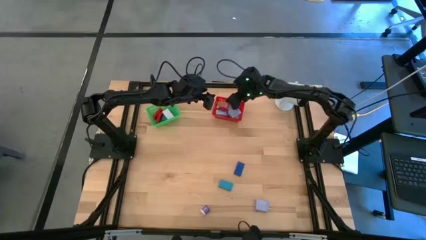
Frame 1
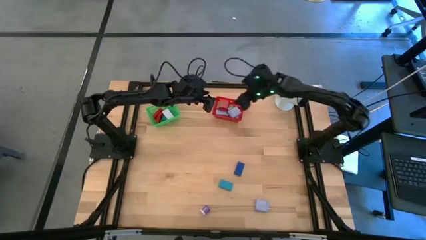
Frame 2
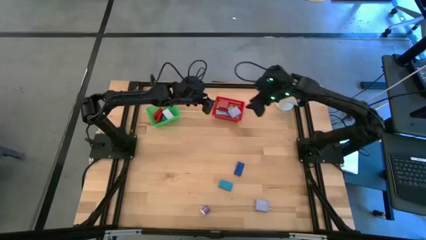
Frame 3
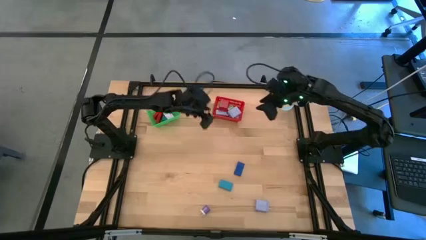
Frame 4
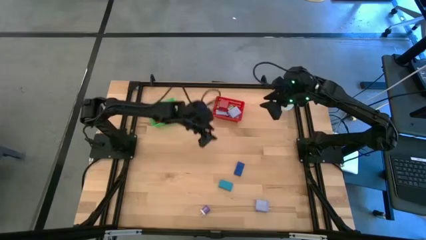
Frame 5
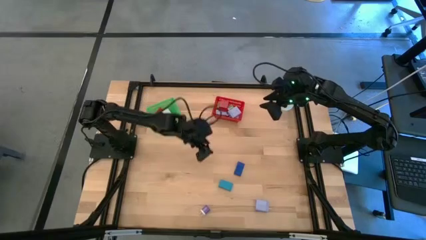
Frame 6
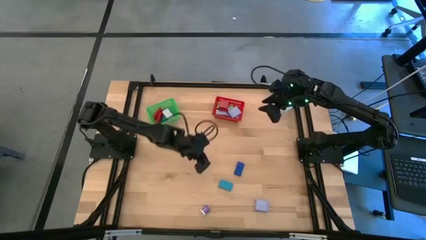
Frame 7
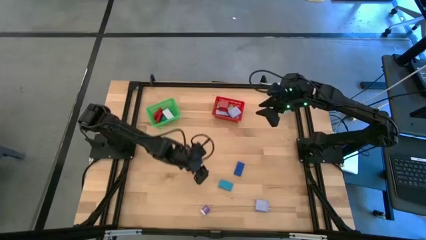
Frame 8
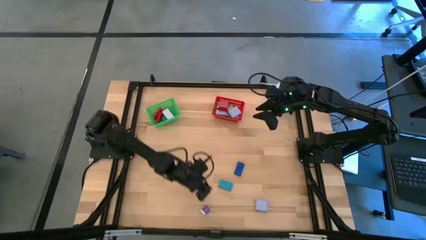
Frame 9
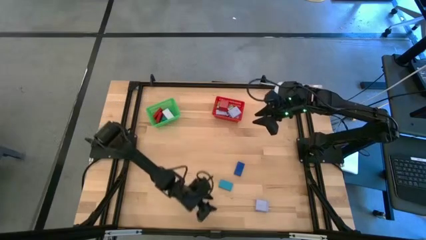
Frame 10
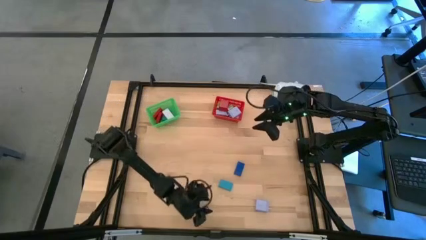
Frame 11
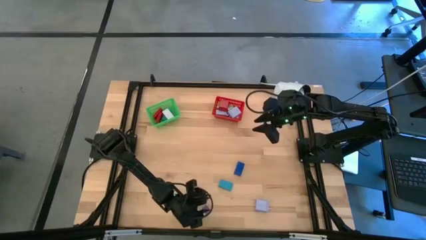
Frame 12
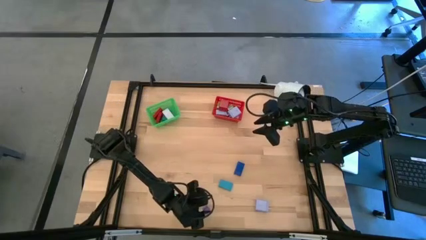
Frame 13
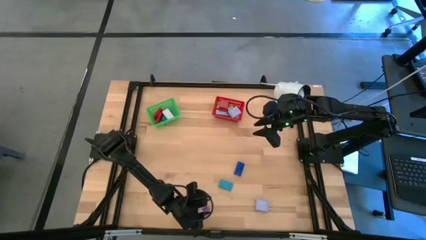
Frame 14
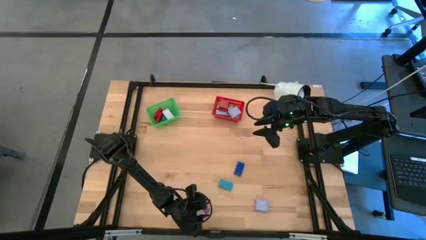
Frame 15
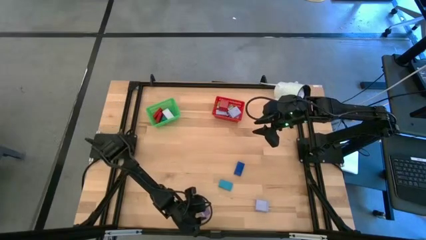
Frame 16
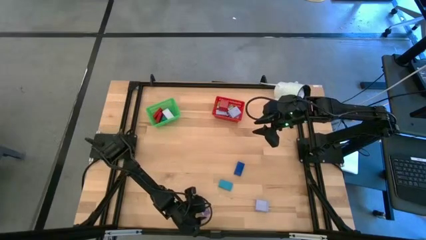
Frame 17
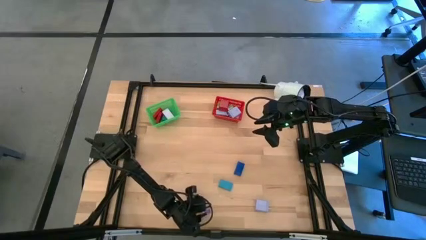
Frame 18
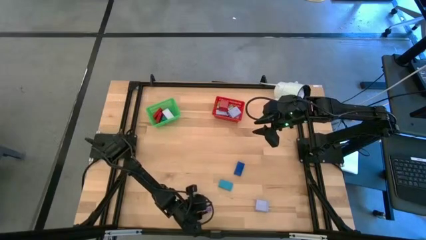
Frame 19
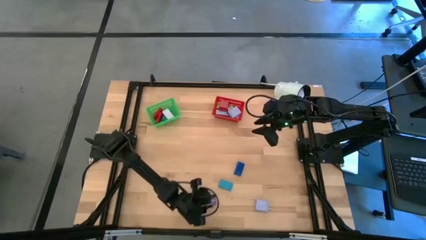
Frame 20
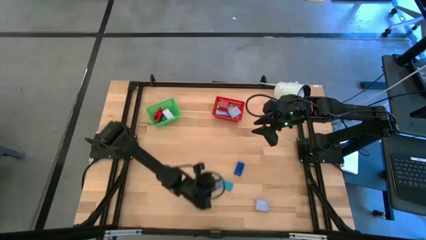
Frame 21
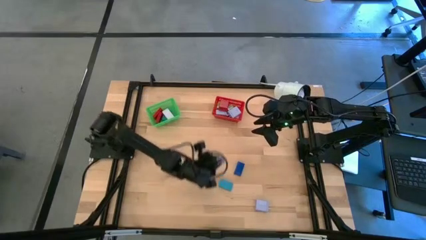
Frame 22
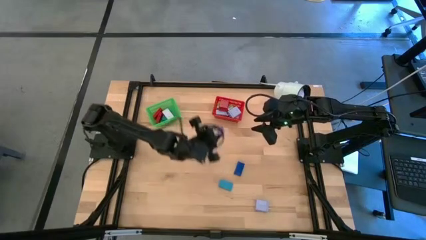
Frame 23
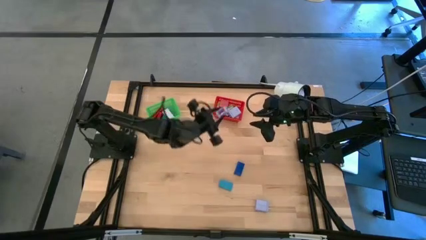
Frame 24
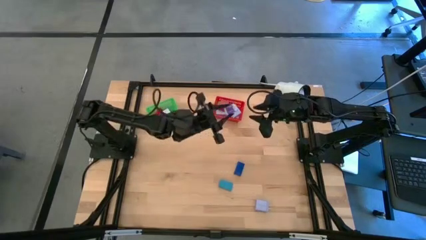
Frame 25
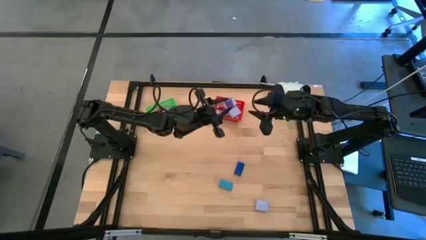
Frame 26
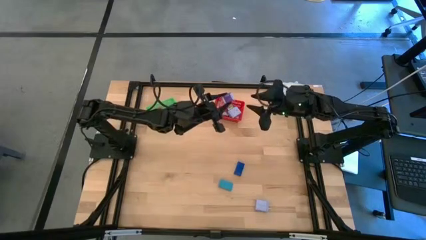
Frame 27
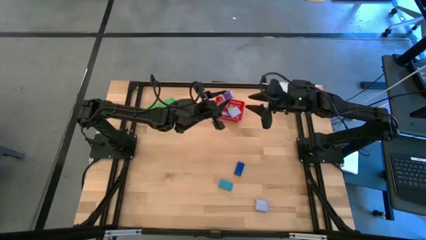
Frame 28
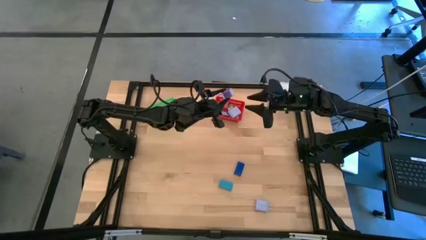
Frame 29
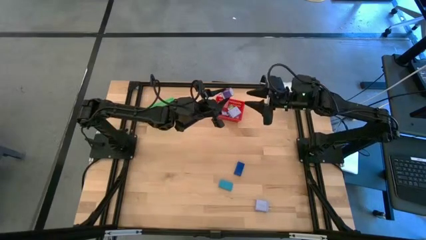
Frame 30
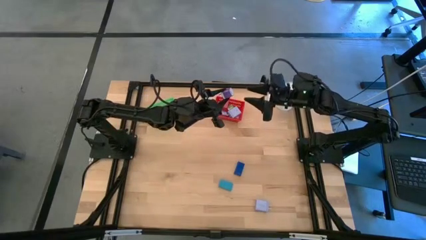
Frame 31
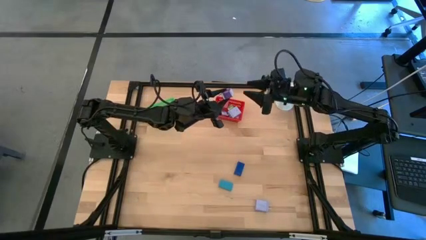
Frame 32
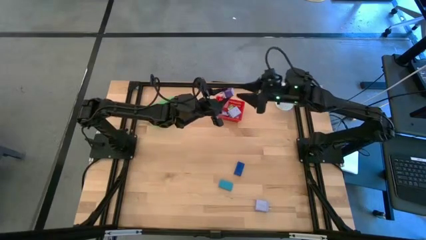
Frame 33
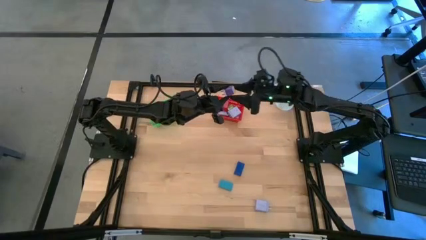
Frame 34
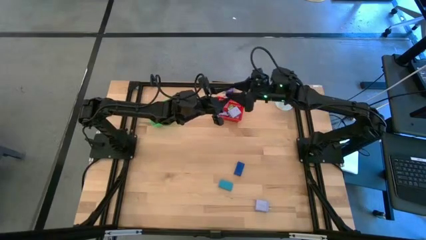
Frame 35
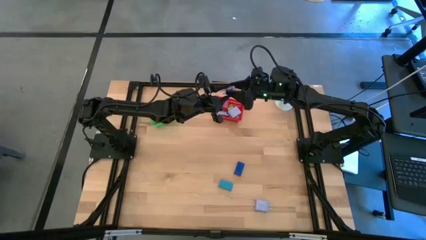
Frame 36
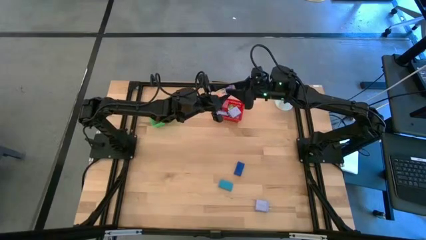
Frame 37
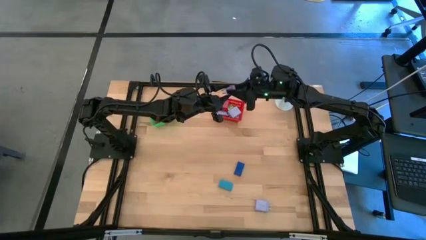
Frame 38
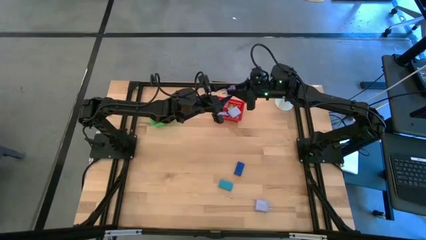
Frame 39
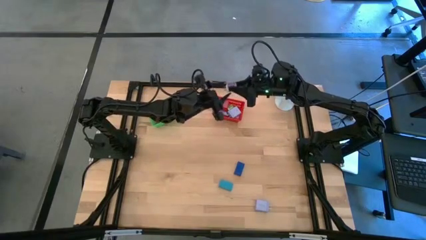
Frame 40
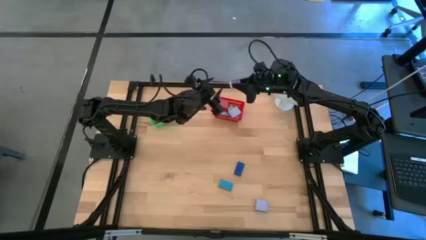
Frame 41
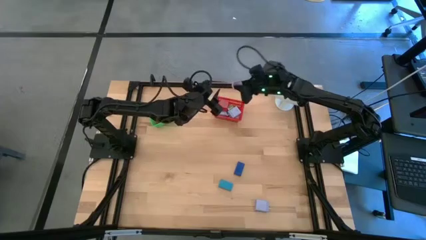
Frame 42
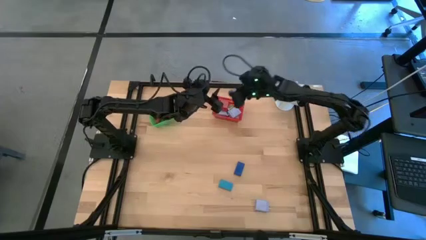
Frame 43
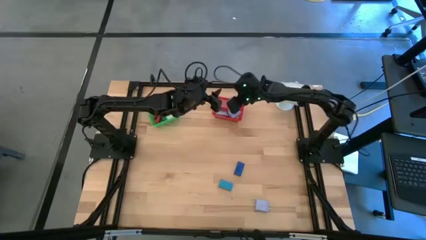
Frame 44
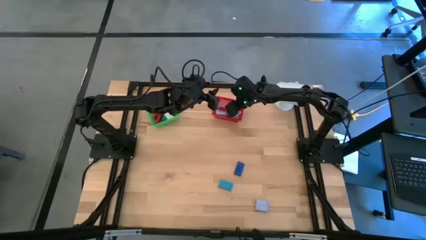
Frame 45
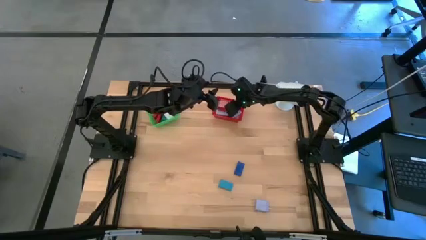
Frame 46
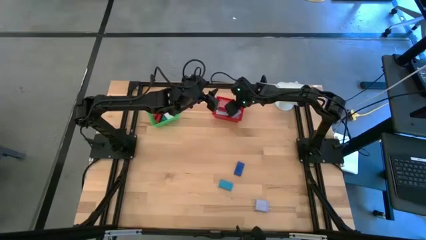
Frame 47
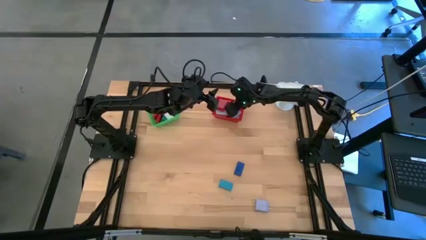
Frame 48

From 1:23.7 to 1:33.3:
Task: Pick & Place Office items
Put the violet charger adapter into the red bin

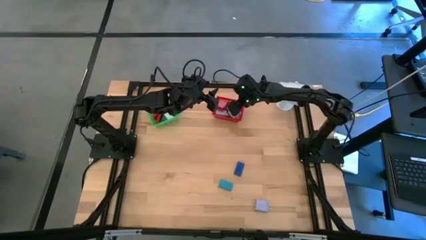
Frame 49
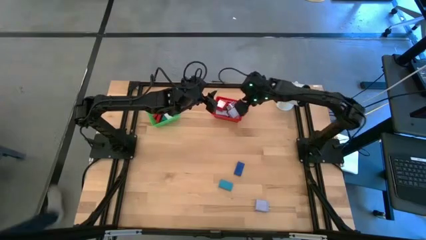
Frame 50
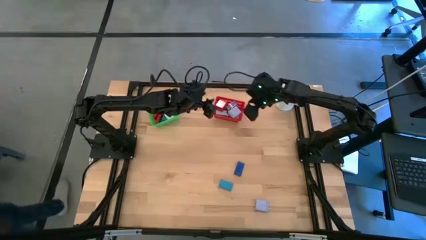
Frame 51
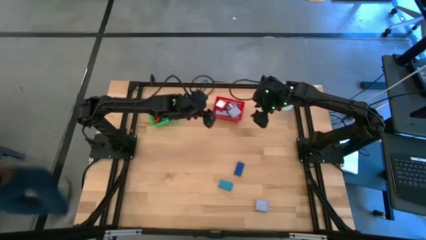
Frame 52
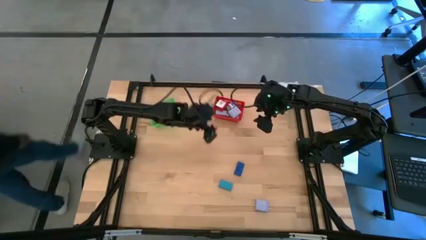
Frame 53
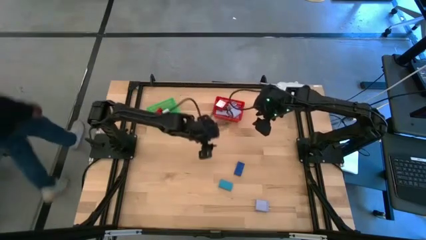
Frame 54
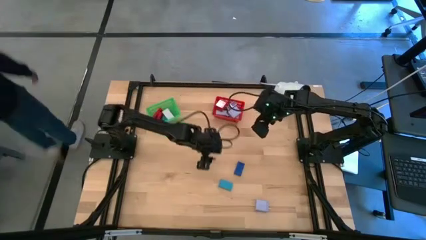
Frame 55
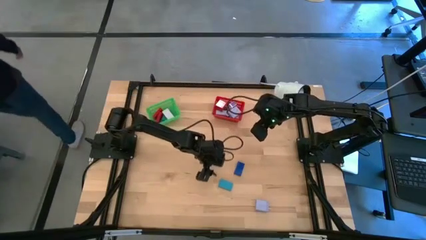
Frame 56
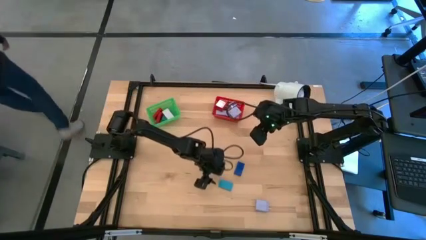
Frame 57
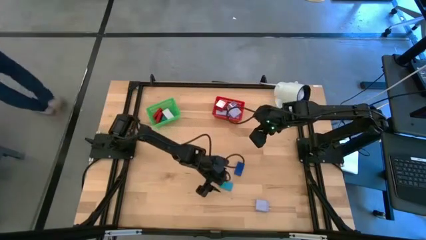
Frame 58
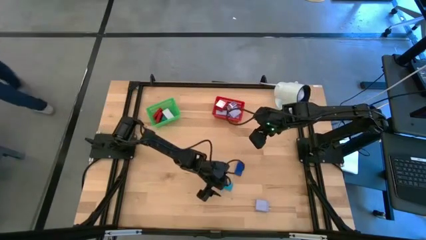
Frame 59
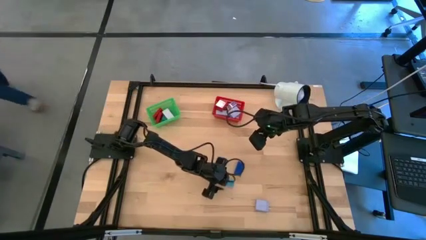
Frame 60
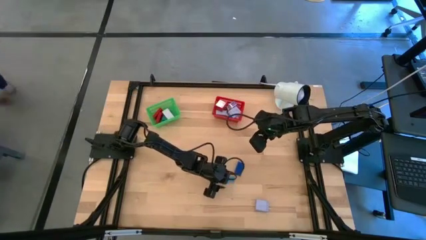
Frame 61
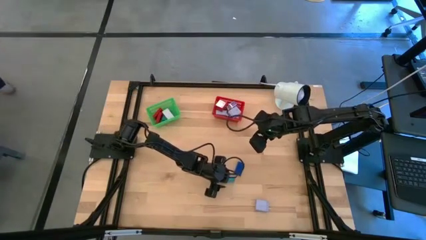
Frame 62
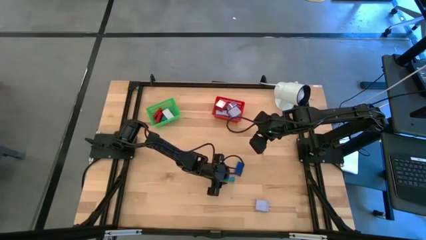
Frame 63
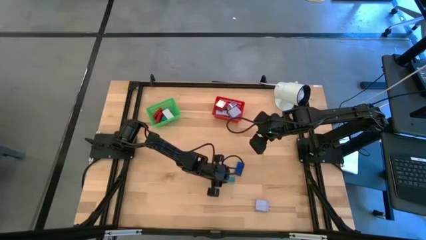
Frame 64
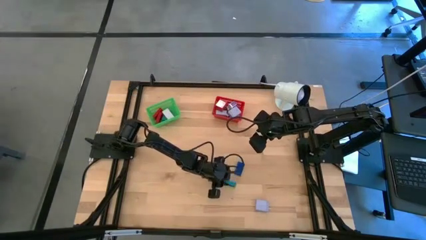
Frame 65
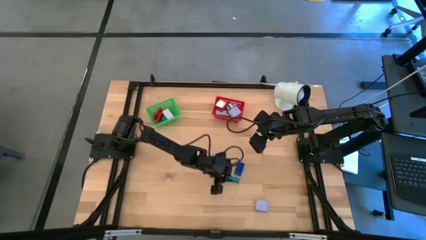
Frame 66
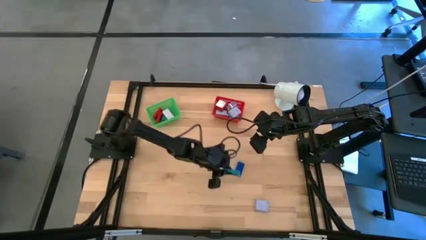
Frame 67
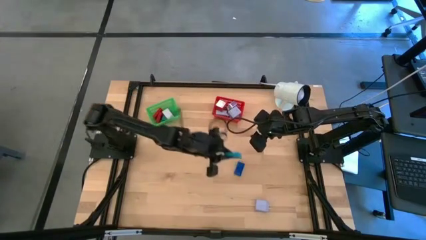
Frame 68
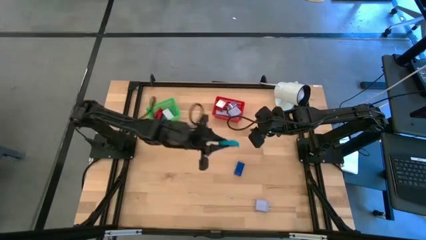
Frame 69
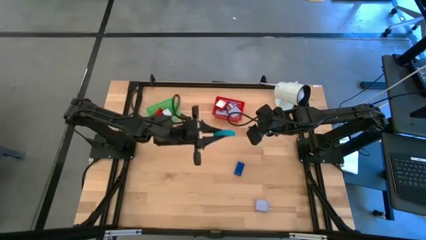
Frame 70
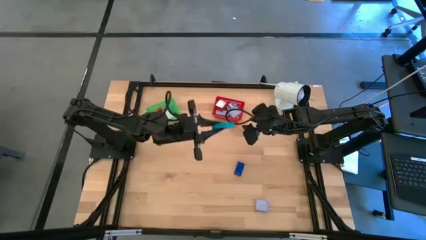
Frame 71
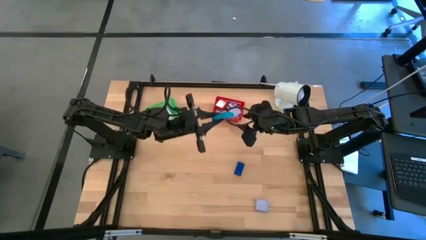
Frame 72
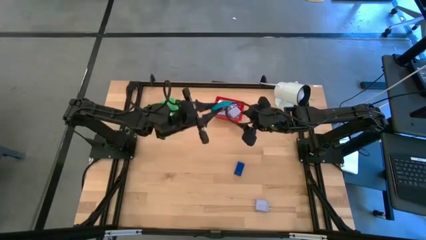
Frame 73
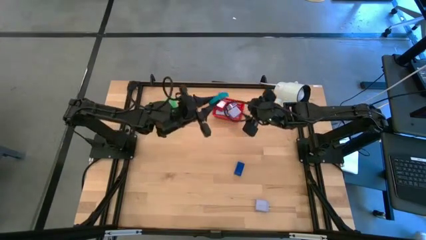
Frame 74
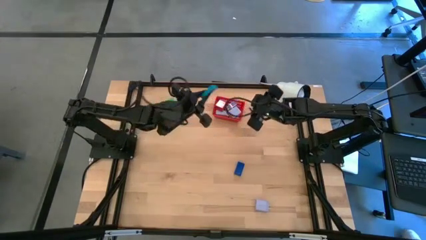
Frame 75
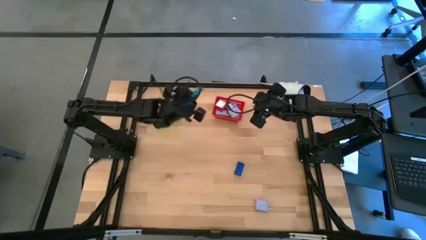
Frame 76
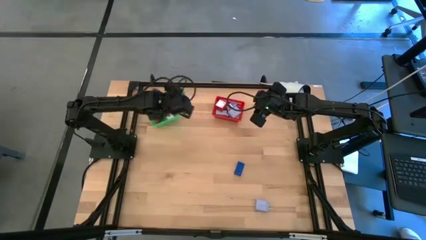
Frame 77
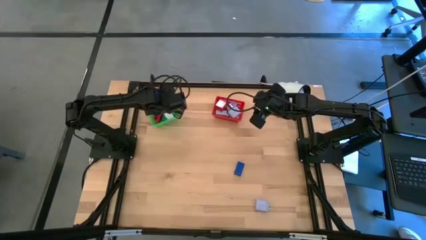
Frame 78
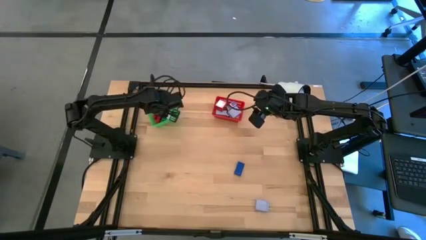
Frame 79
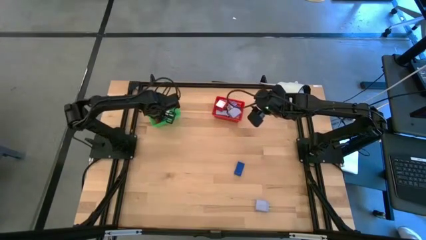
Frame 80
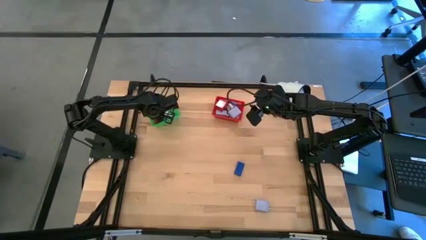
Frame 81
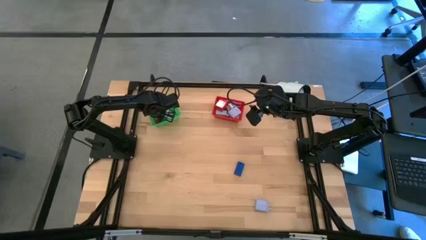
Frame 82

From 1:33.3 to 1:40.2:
Put the blue digital clock into the green bin
